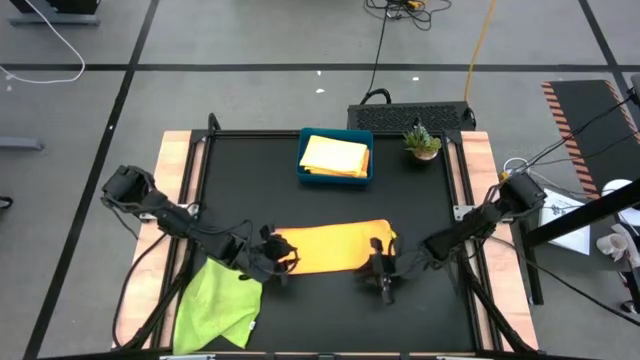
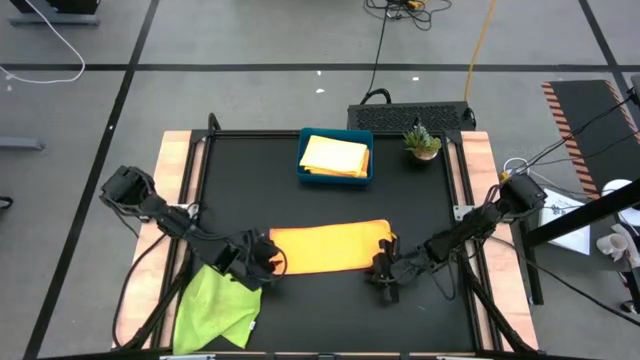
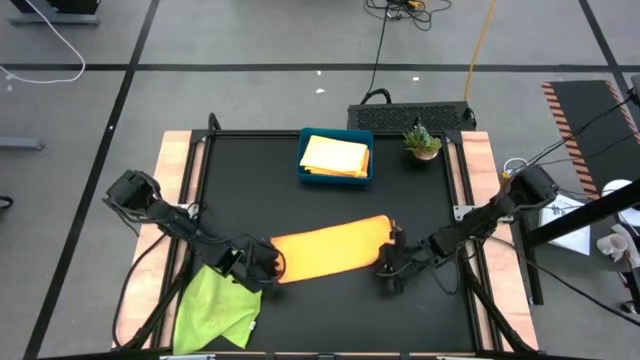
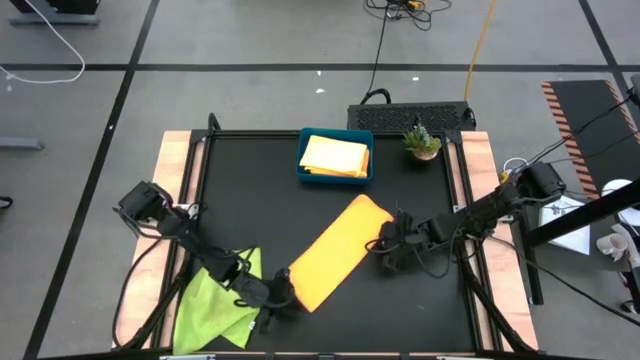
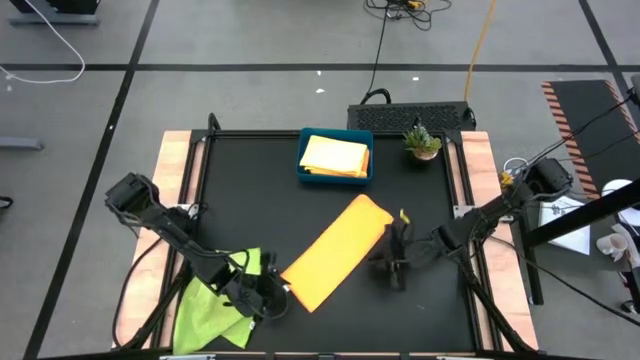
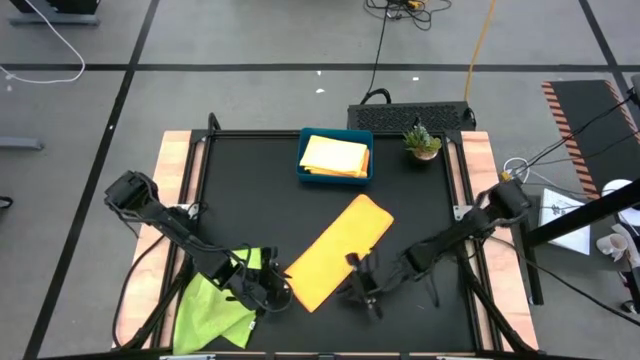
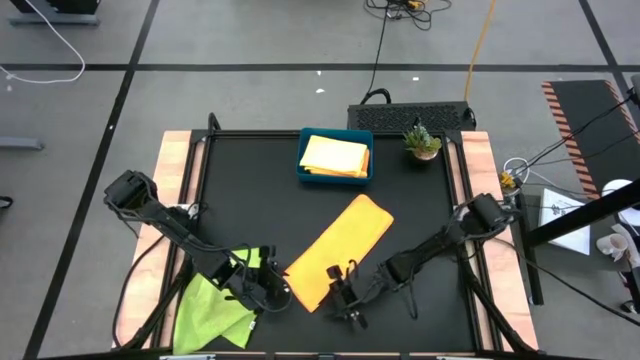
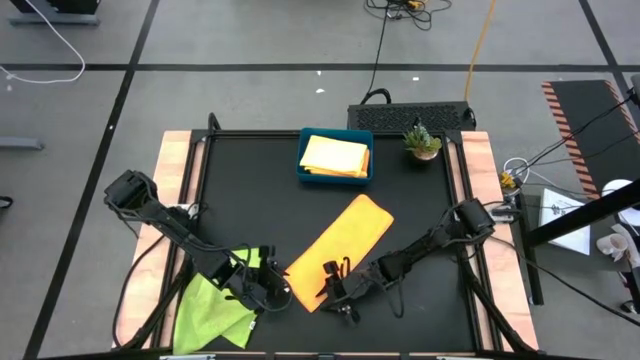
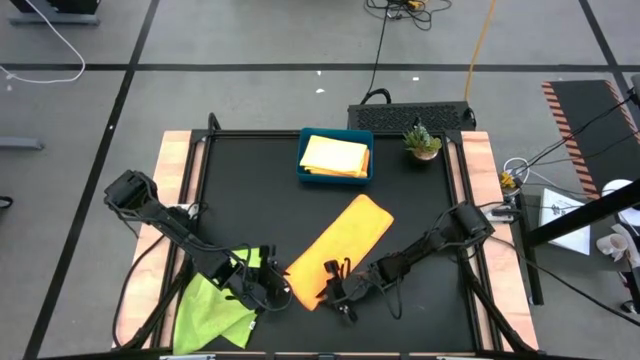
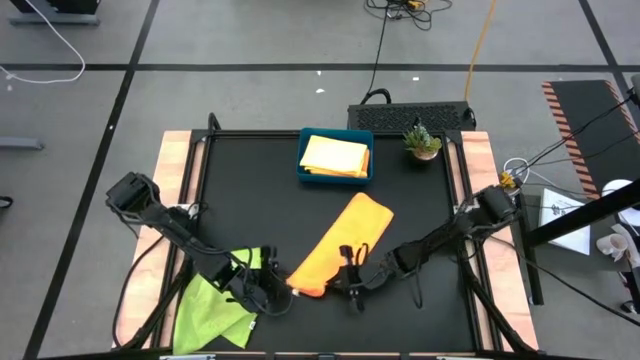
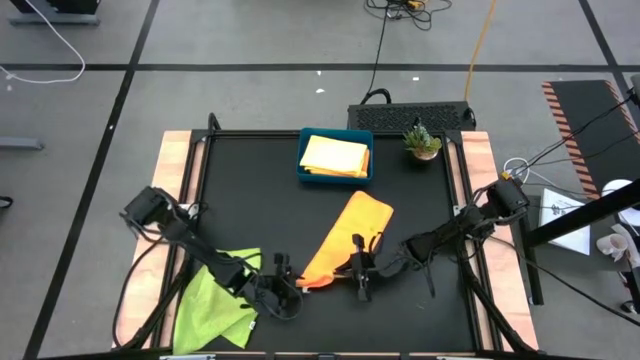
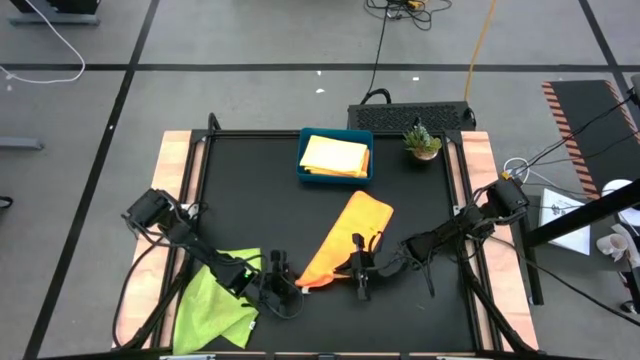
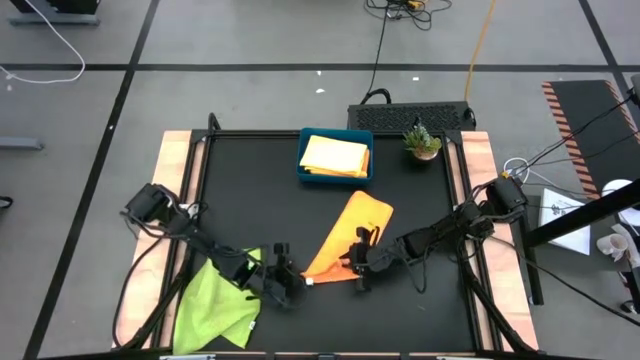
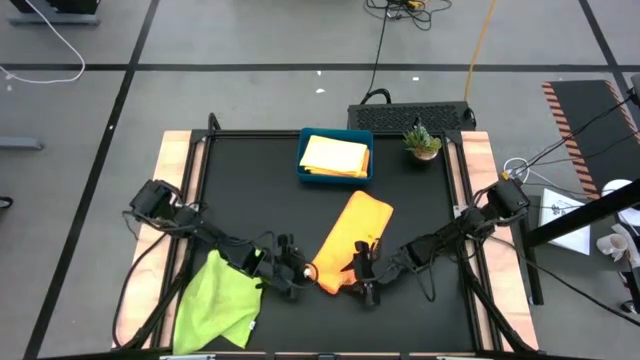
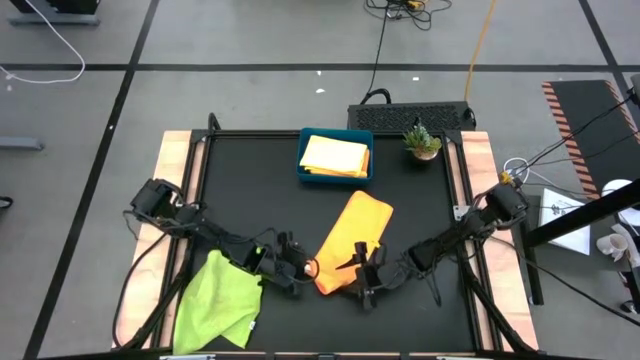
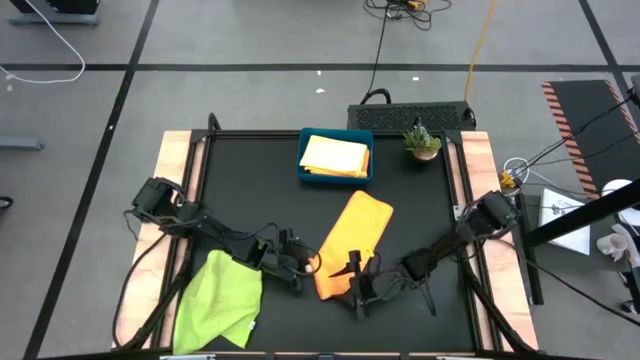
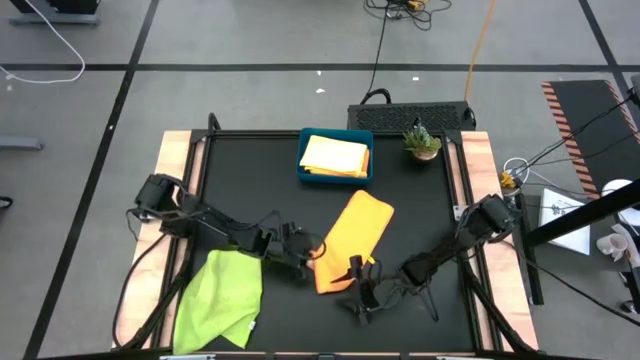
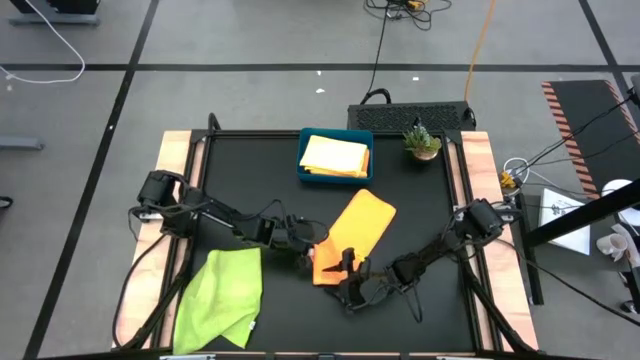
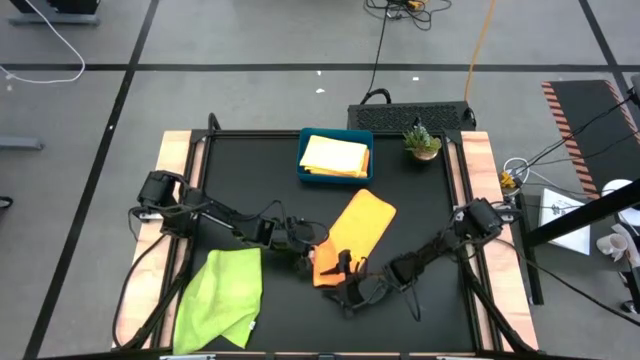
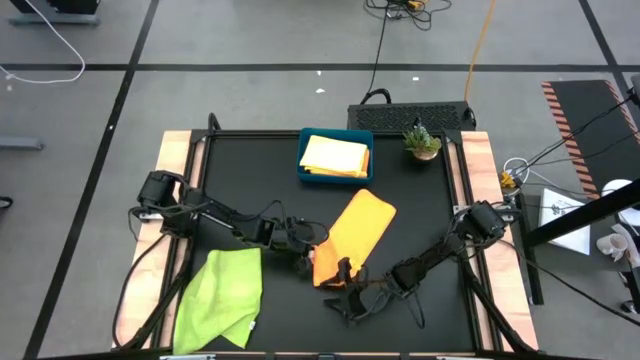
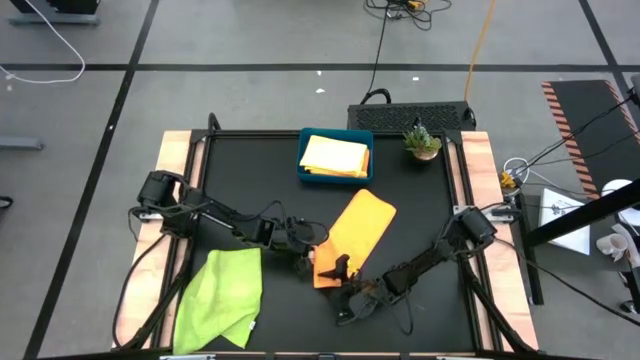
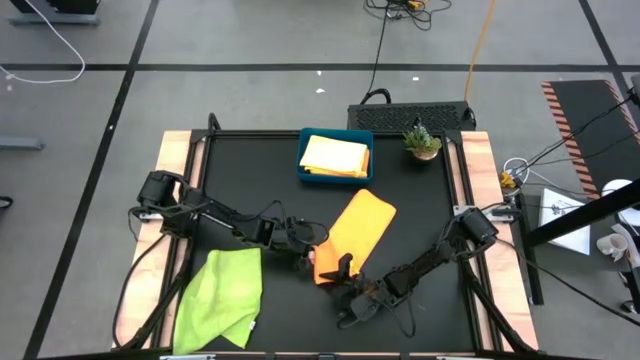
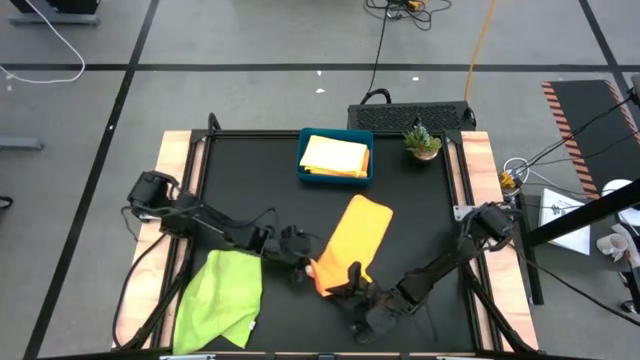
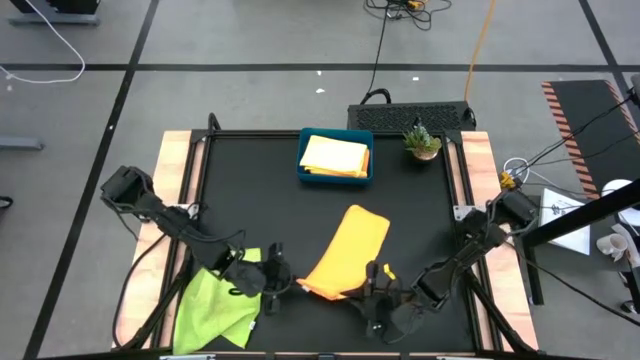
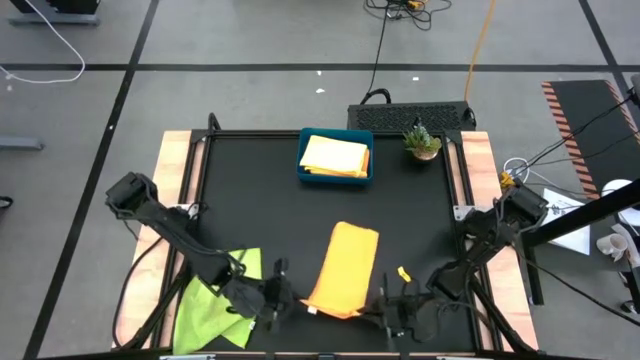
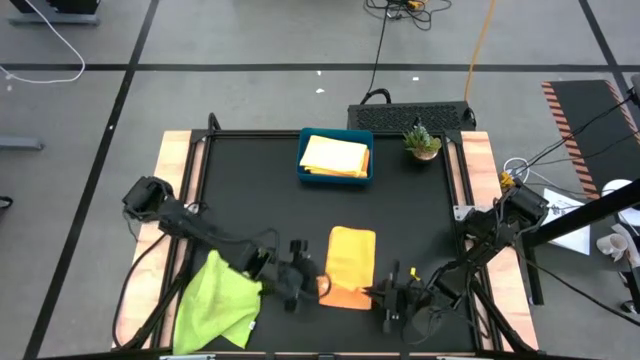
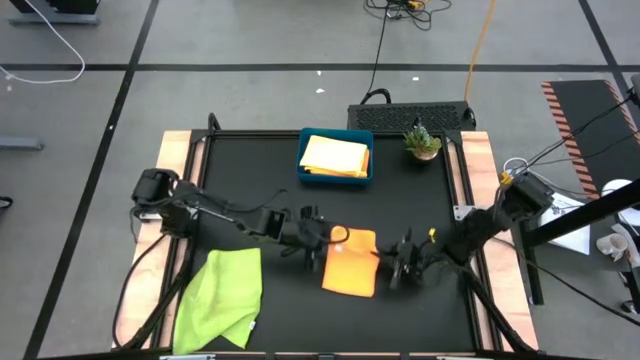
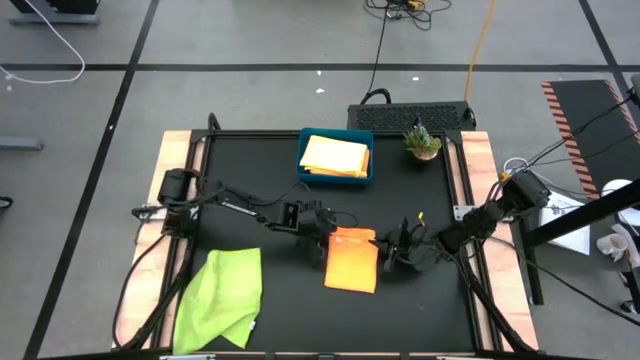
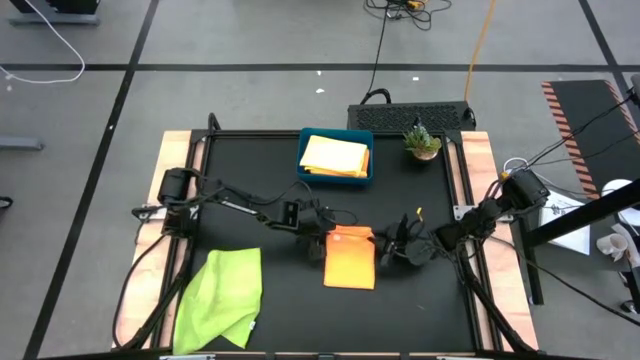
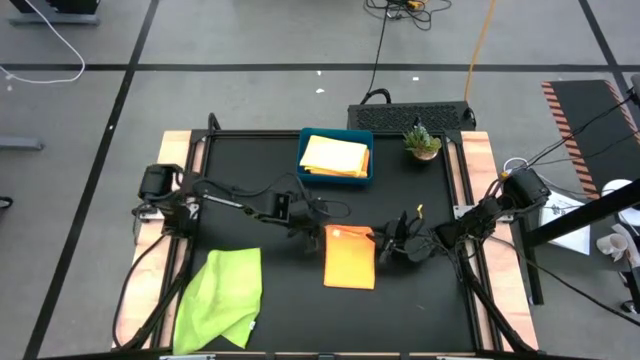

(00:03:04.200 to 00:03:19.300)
Task: Fold microfiber towels
Fold the orange microfiber cloth

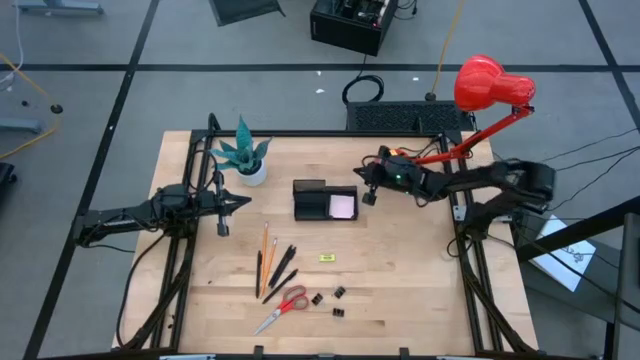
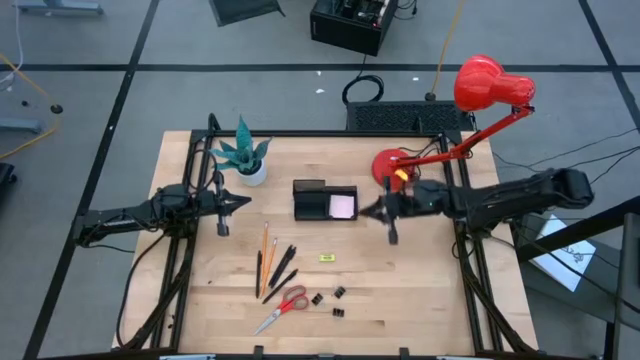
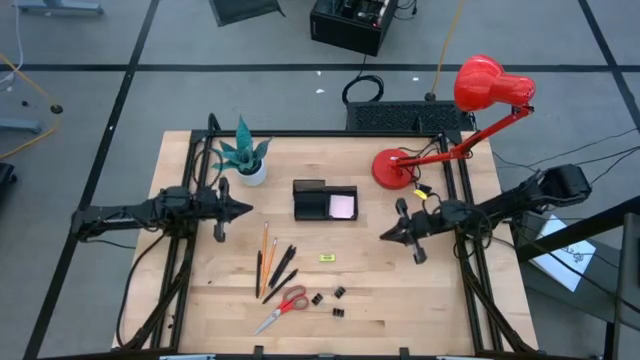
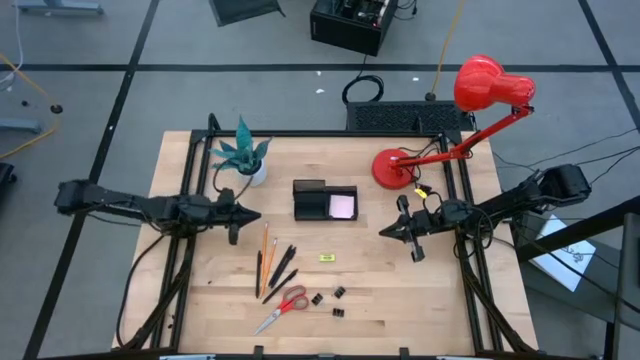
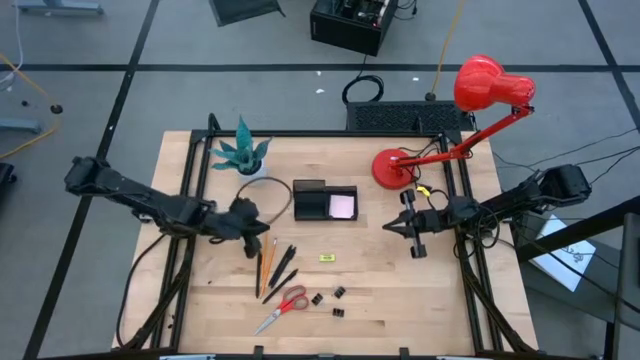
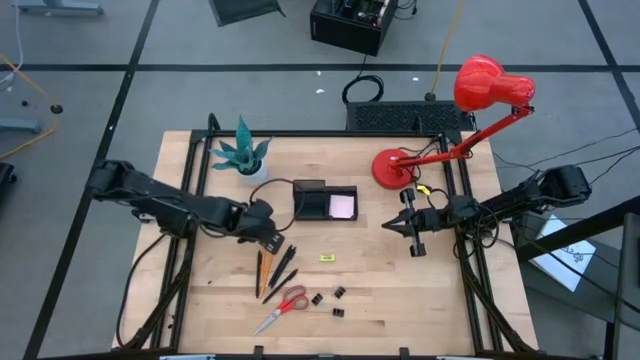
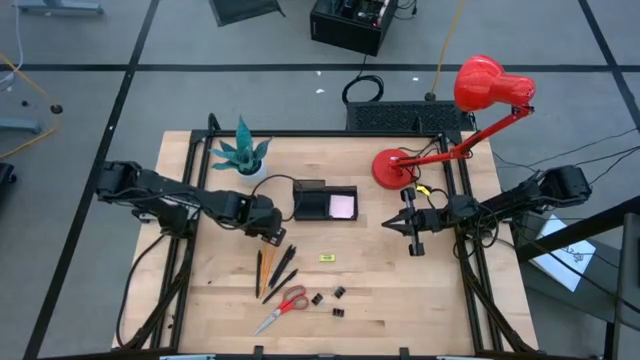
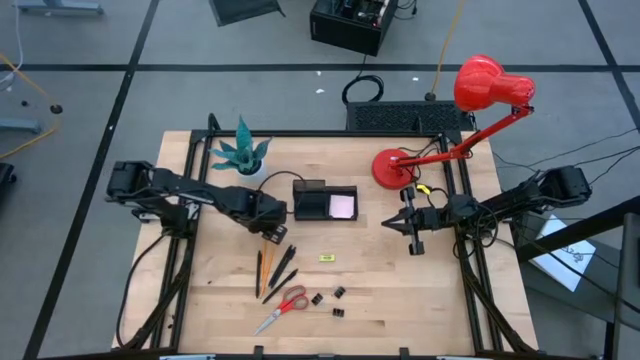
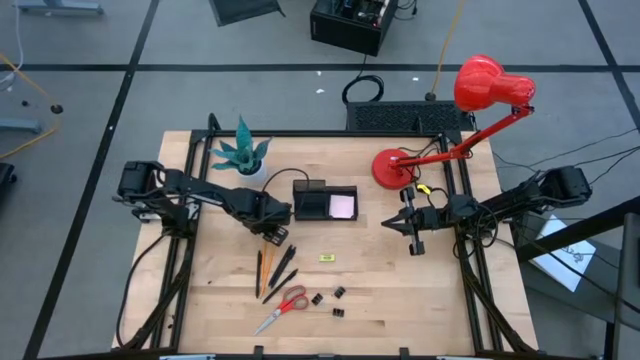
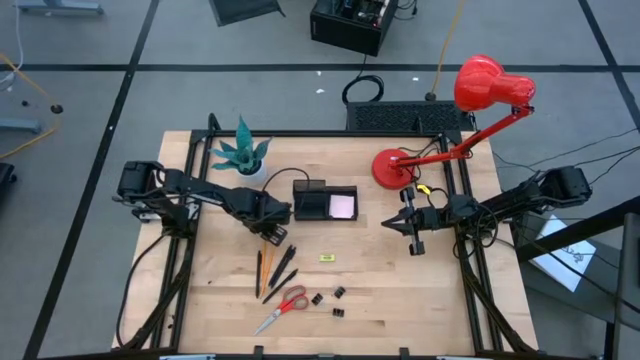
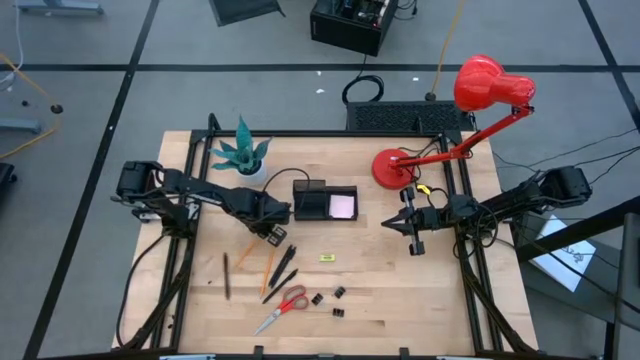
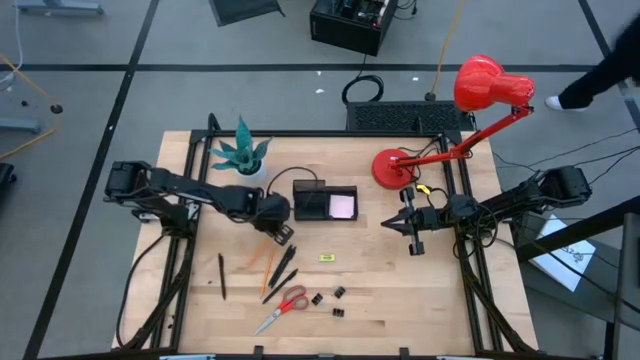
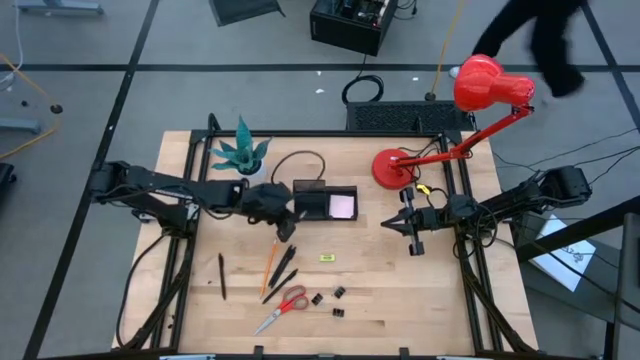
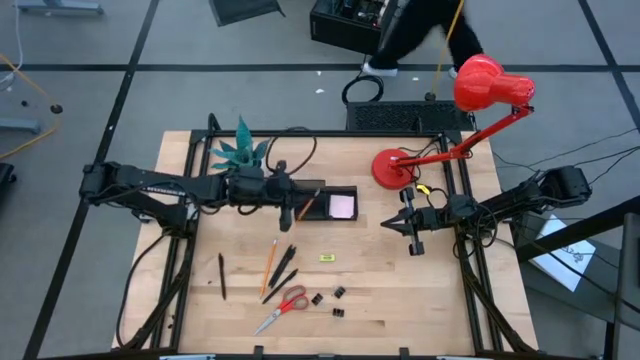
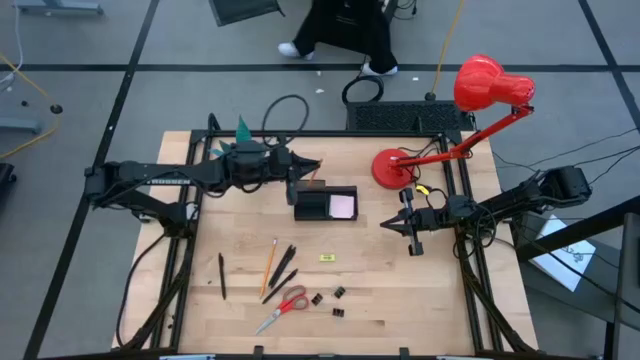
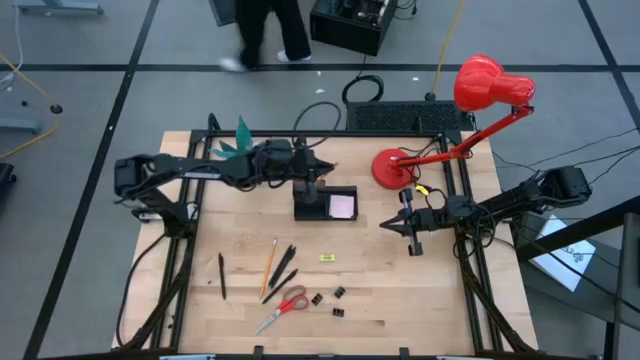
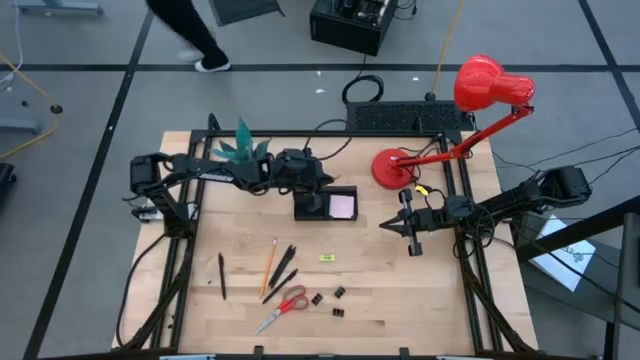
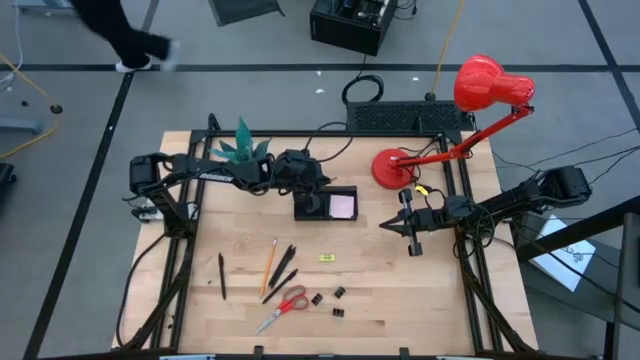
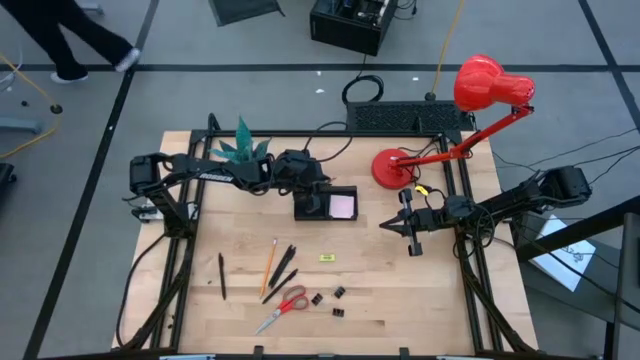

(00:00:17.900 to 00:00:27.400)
Task: Pick and place office supplies into organizer
Put the orange pencil into the black desk organizer
